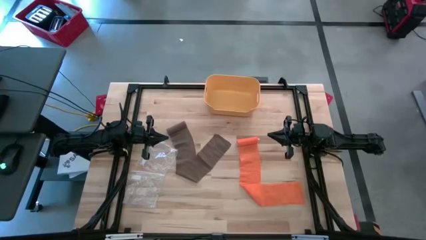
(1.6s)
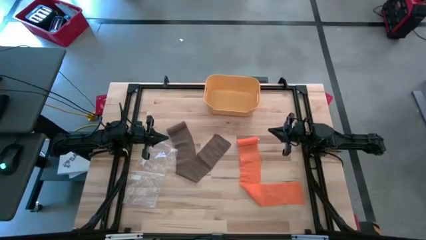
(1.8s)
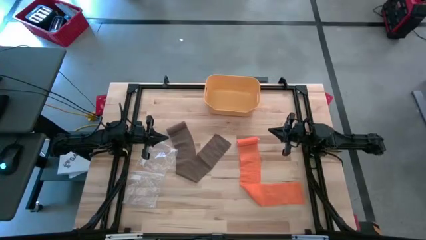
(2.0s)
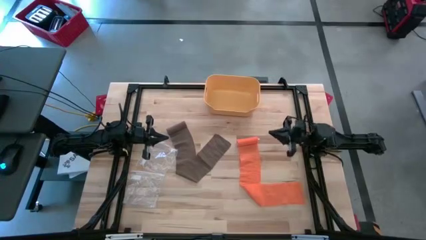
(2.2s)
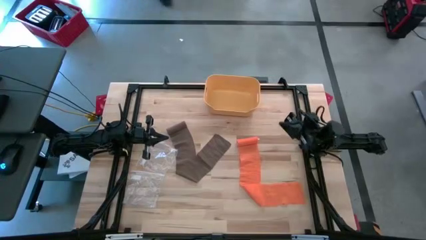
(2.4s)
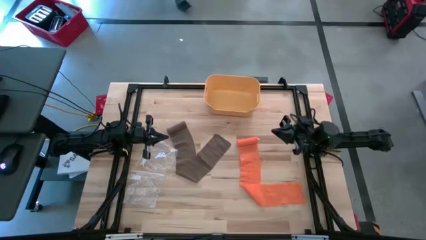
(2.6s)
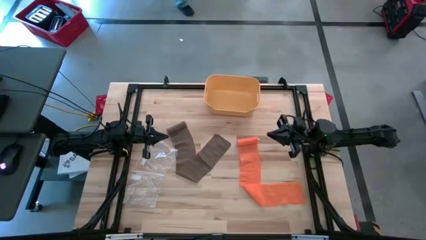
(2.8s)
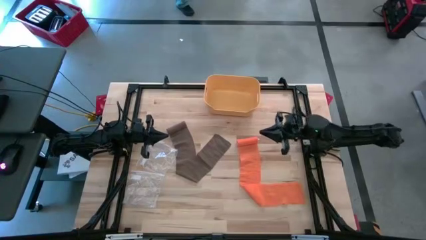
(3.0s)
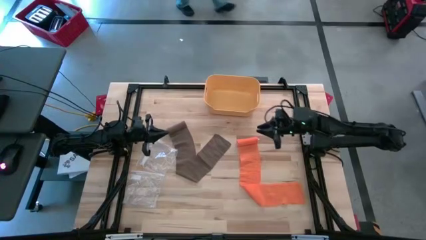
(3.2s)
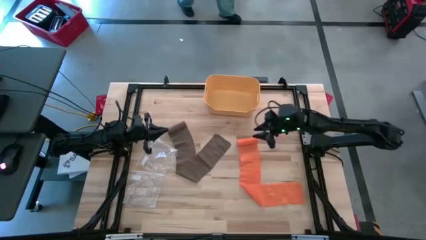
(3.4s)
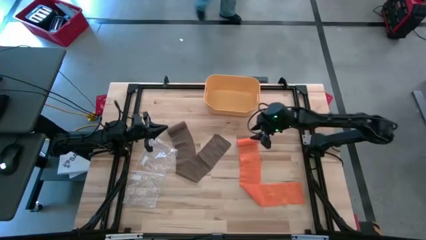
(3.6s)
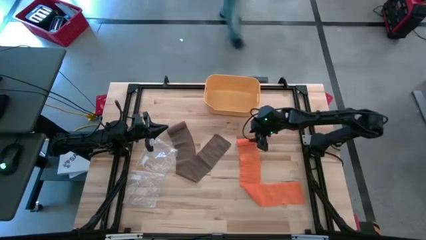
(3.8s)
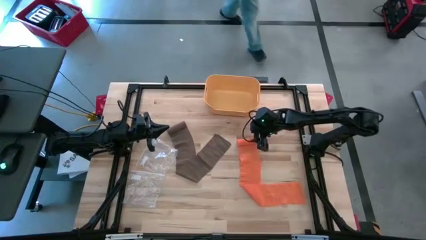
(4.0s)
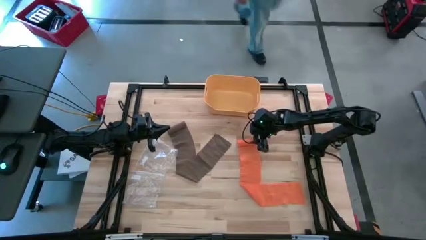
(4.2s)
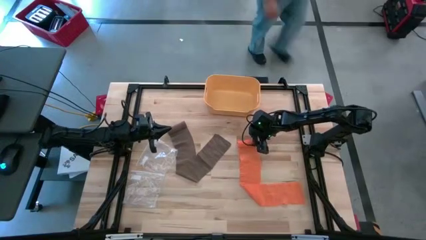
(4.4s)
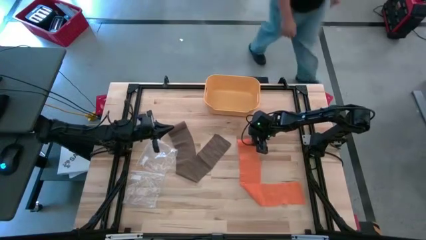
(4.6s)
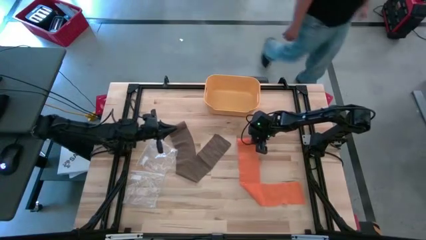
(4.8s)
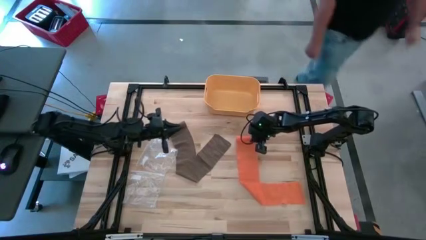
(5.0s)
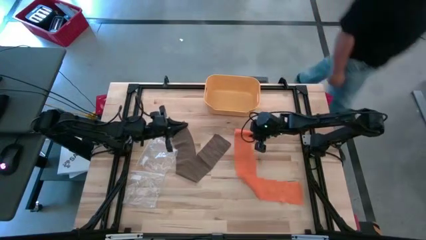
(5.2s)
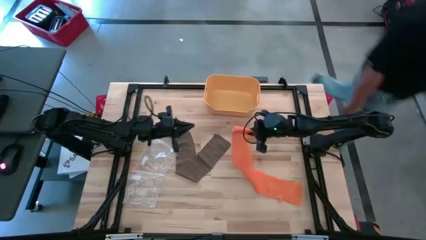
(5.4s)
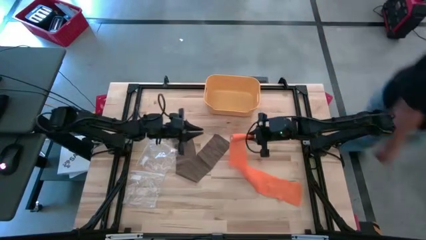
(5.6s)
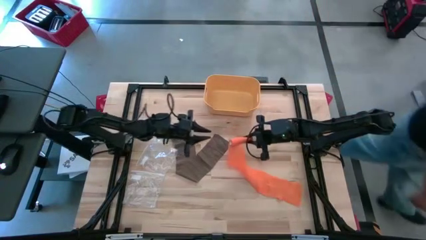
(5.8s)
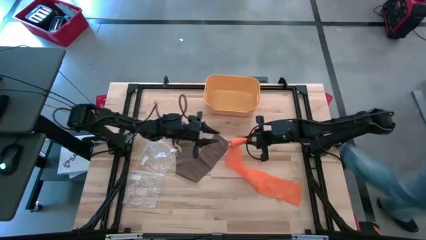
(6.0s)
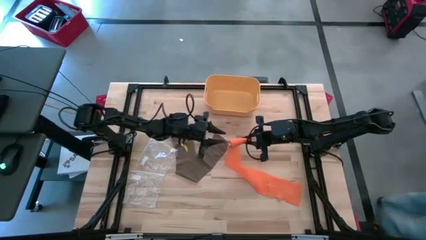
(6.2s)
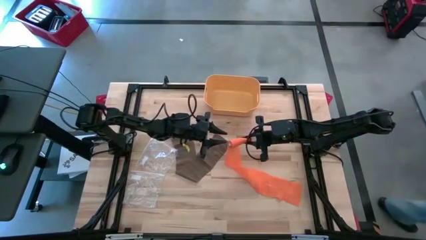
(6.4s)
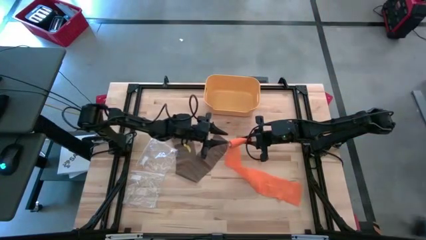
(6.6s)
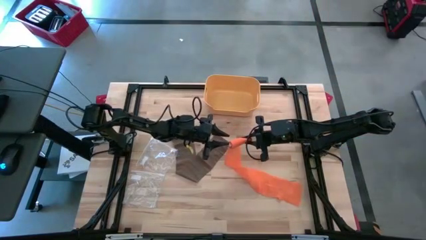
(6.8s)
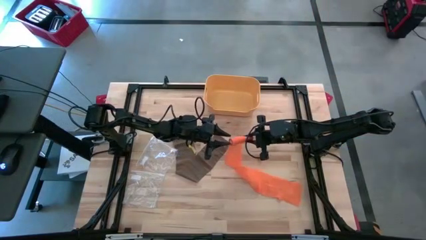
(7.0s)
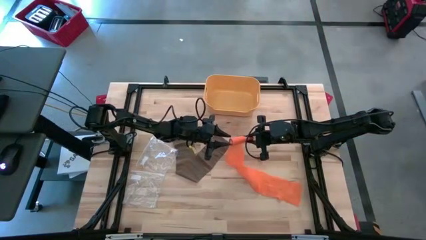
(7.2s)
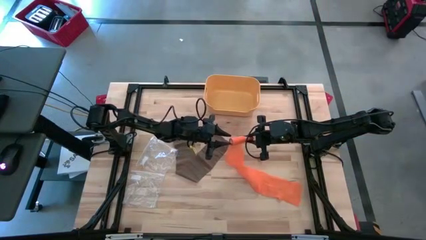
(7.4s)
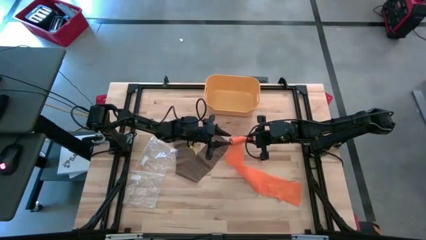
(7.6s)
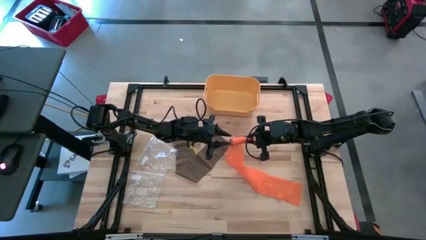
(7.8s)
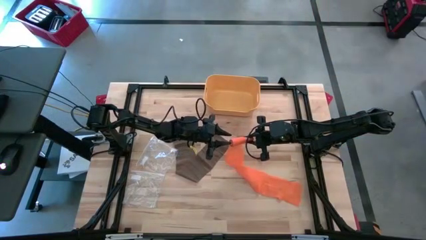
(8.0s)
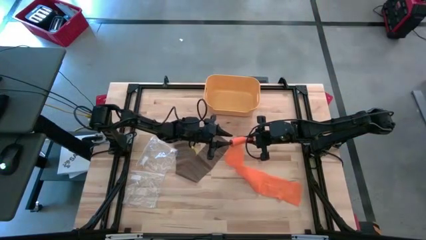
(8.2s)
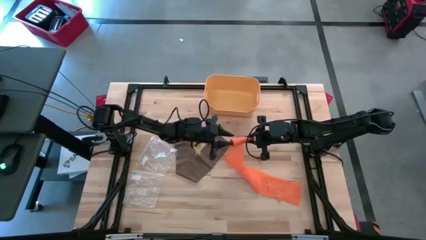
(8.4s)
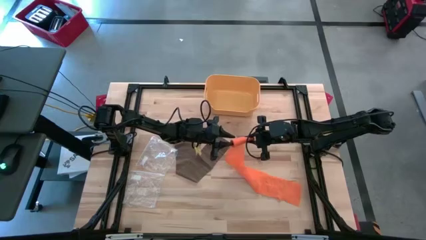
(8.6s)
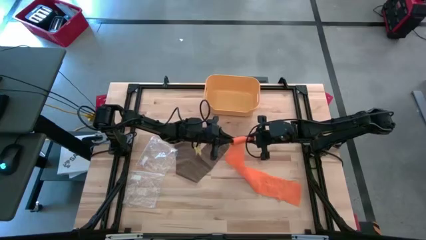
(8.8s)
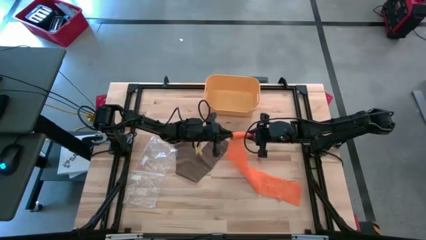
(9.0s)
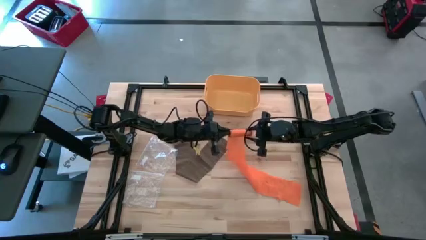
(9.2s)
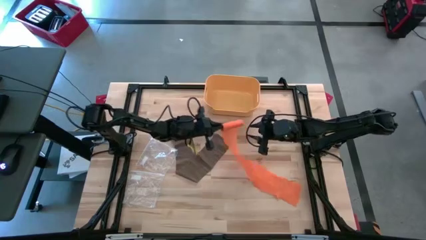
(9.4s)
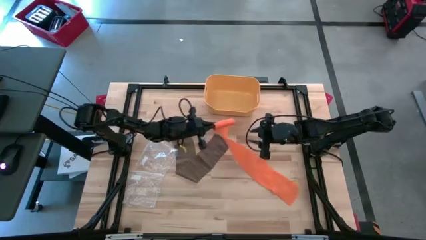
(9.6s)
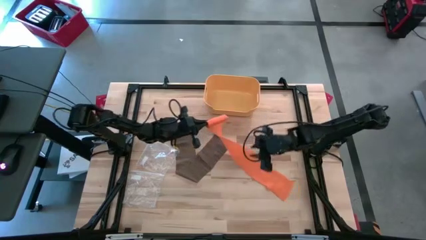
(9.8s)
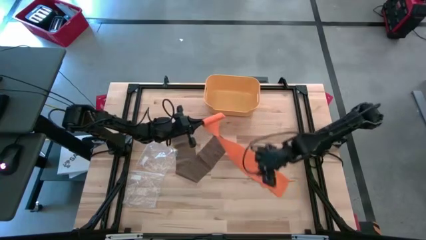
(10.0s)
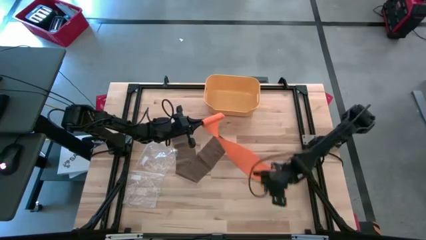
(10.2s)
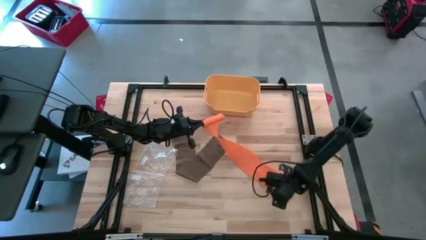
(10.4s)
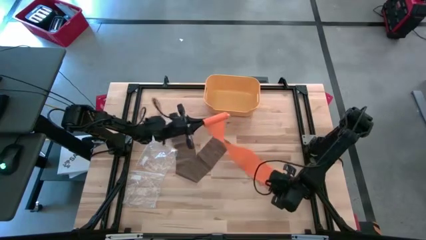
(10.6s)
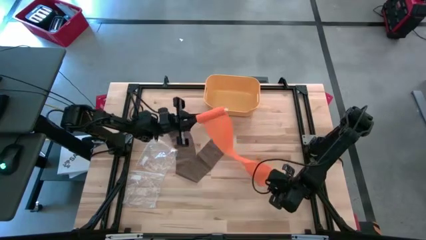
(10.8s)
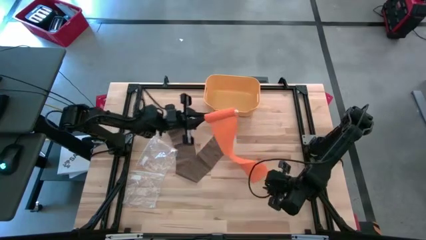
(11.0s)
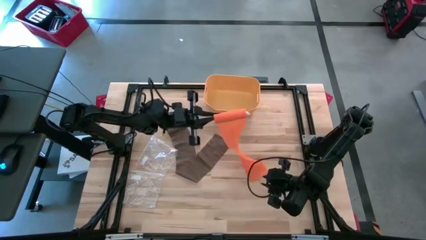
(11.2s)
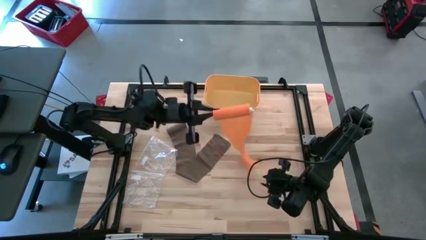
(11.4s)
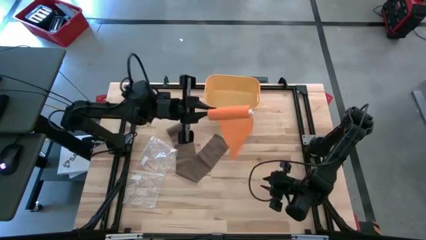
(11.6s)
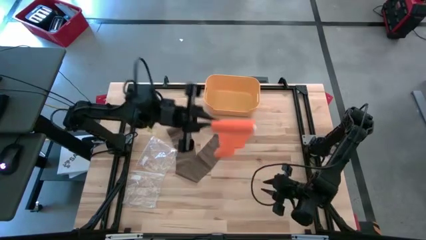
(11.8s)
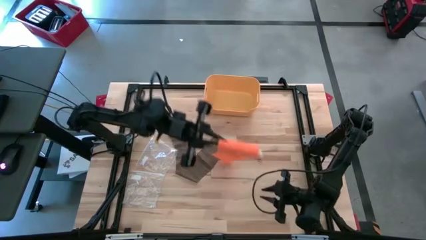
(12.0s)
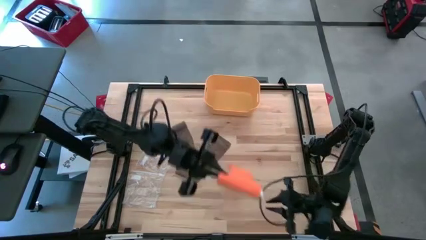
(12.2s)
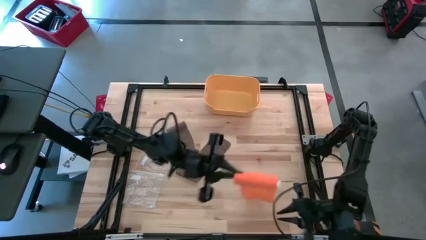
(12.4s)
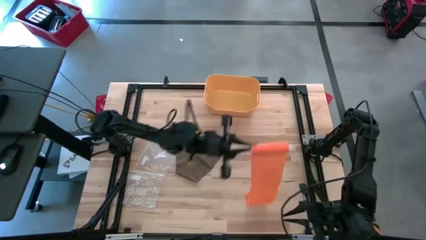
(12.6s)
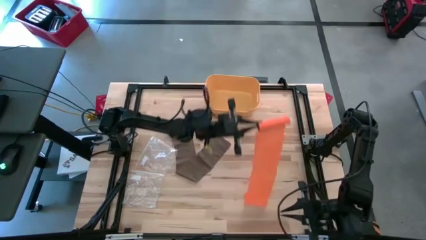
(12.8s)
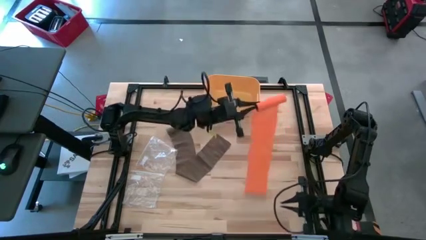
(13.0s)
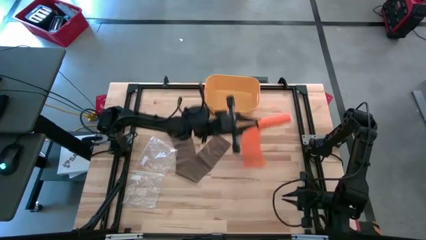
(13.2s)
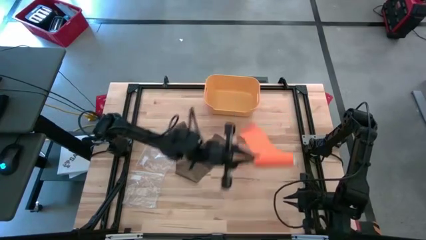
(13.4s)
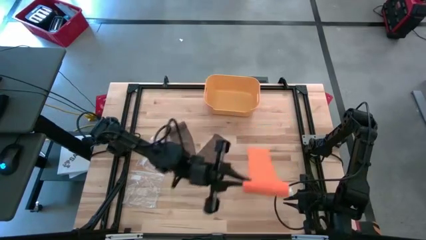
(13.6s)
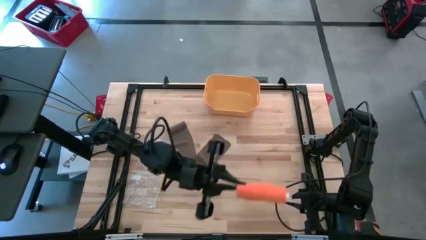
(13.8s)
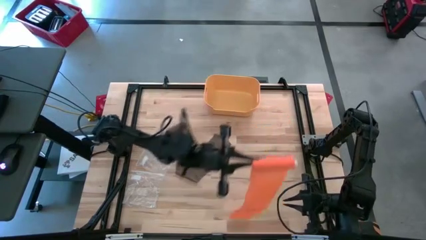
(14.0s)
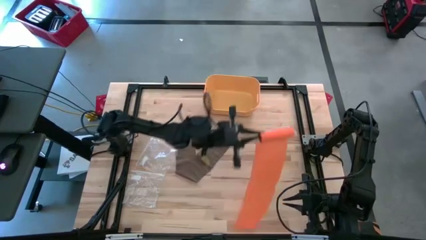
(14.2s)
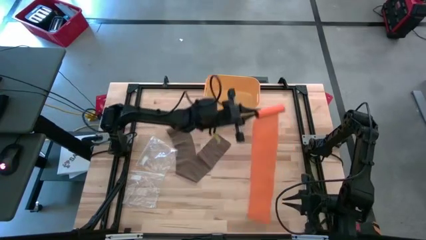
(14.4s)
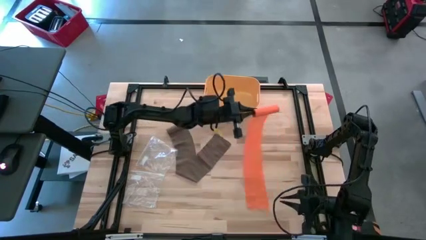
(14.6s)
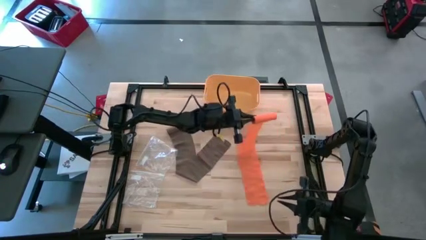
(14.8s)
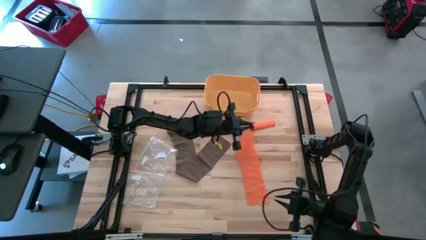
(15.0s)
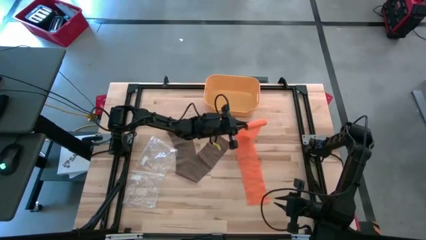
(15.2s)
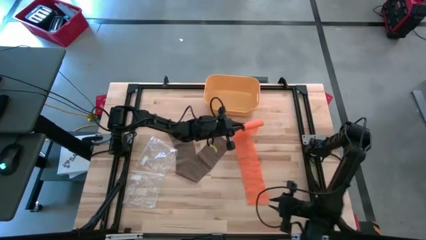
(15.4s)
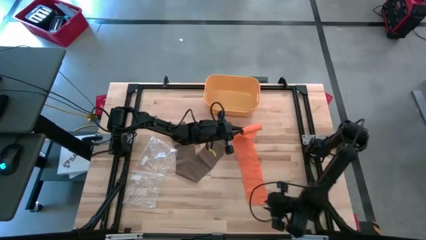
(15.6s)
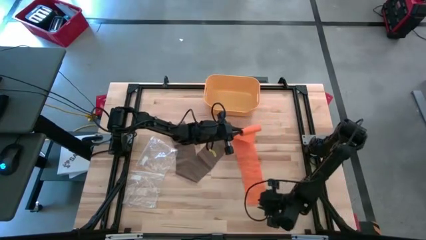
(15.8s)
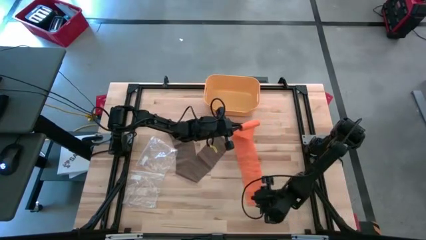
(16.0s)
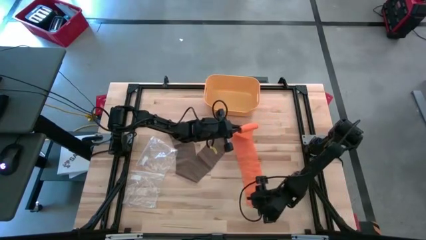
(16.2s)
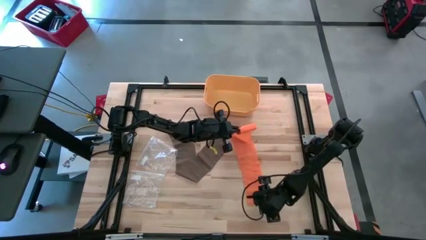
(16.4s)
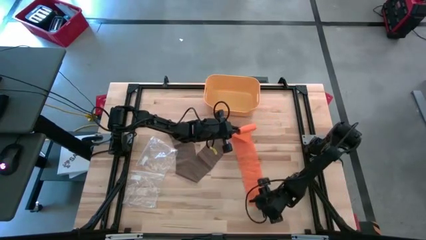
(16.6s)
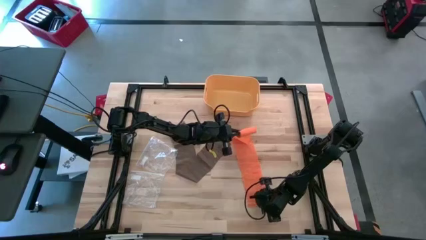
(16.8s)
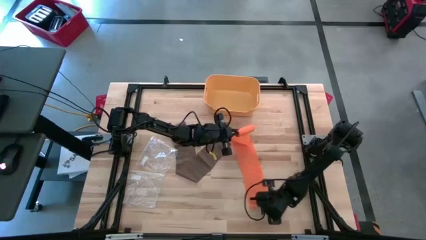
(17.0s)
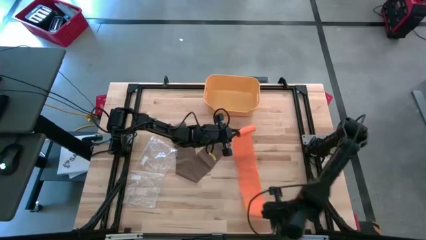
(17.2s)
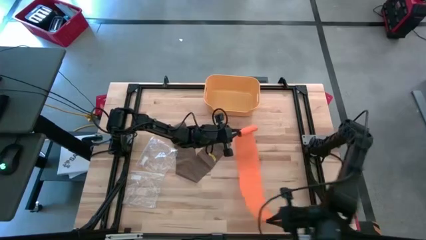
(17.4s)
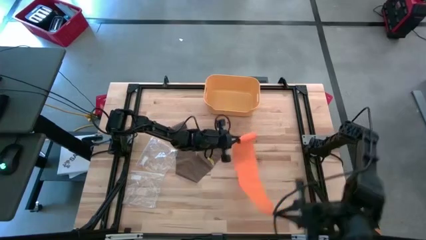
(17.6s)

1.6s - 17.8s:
Task: Roll bandage
Roll the orange bandage
